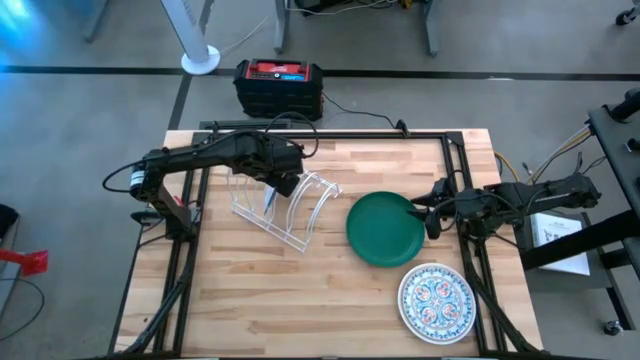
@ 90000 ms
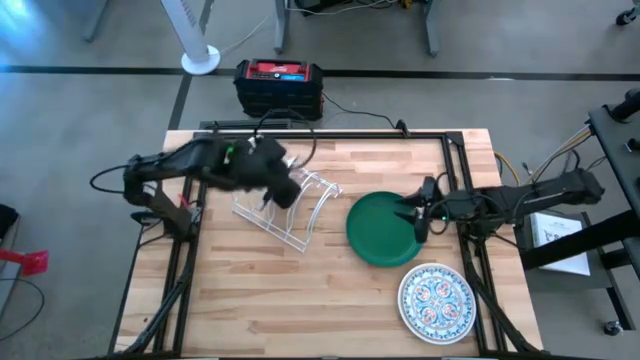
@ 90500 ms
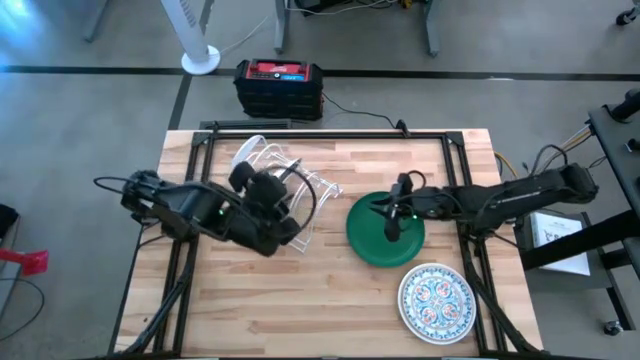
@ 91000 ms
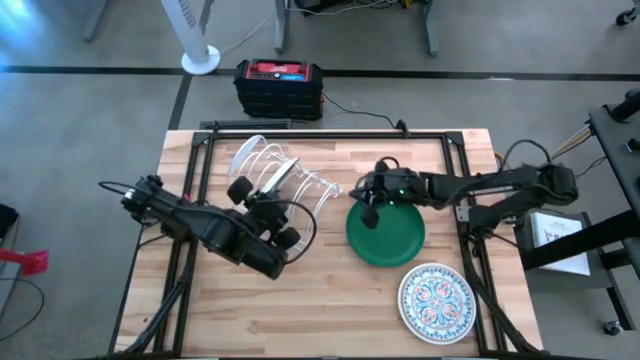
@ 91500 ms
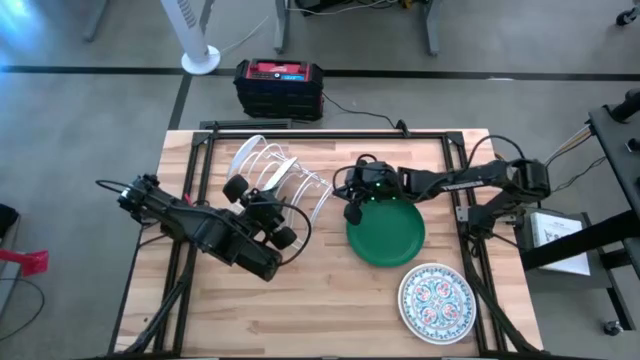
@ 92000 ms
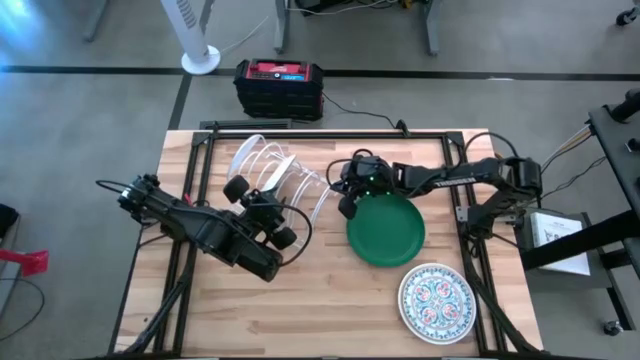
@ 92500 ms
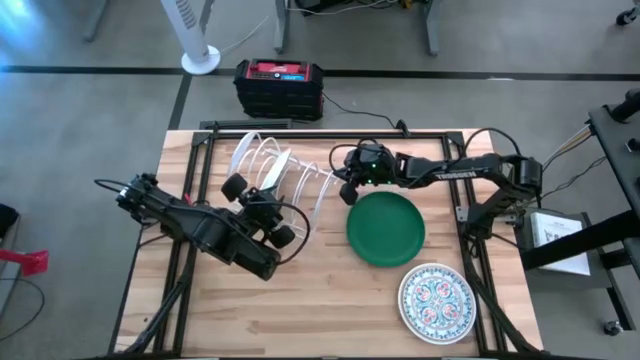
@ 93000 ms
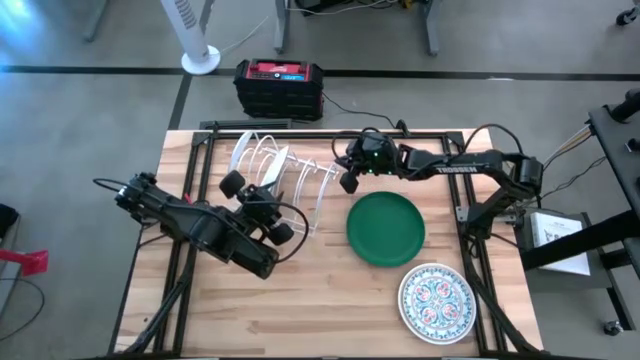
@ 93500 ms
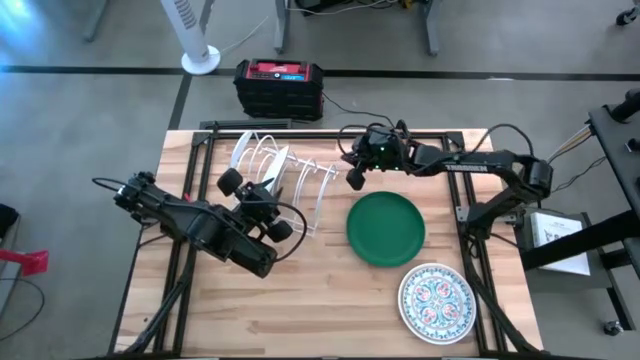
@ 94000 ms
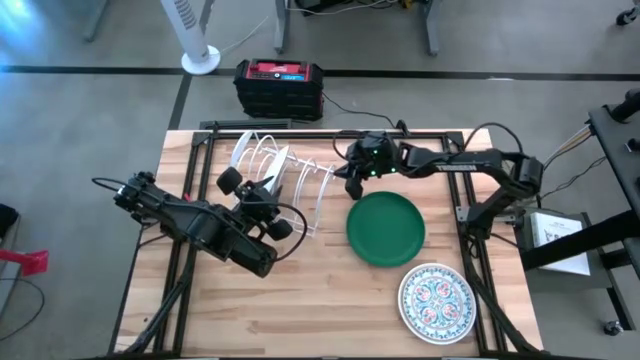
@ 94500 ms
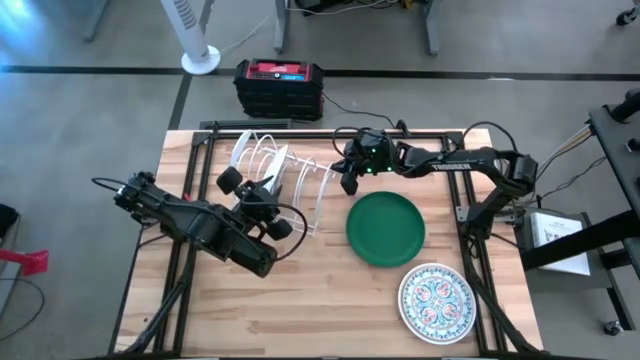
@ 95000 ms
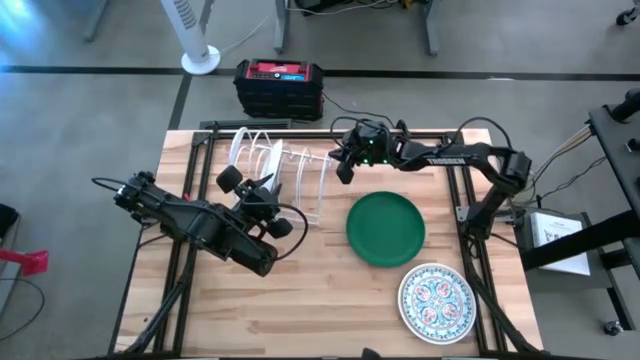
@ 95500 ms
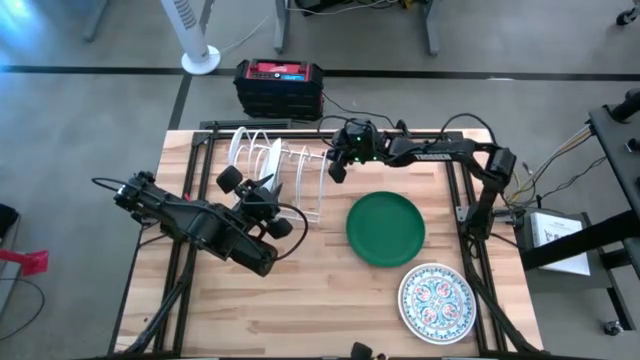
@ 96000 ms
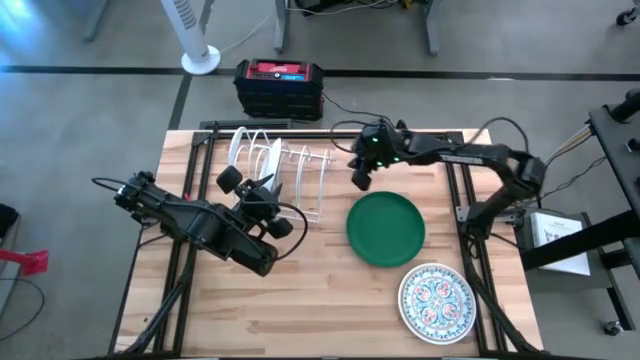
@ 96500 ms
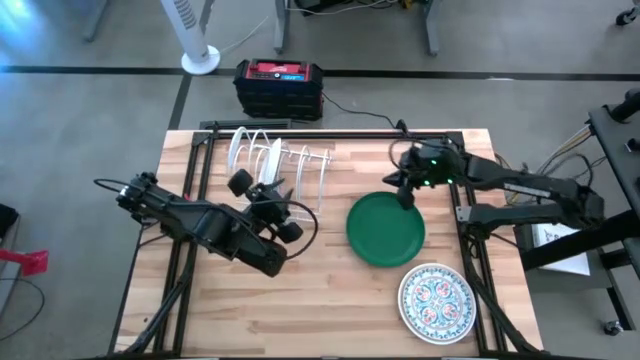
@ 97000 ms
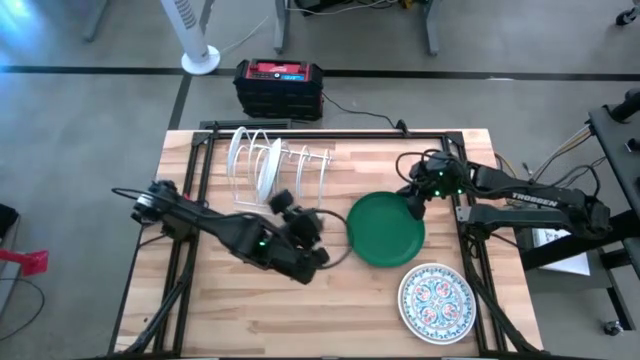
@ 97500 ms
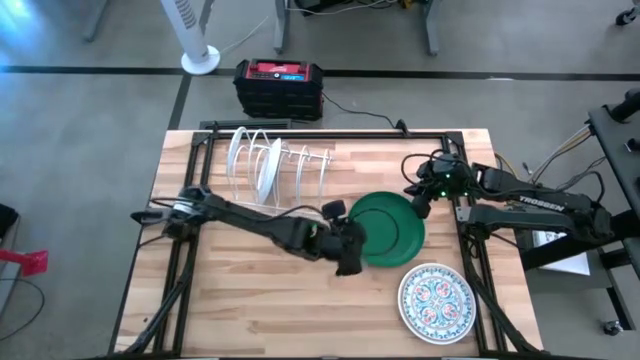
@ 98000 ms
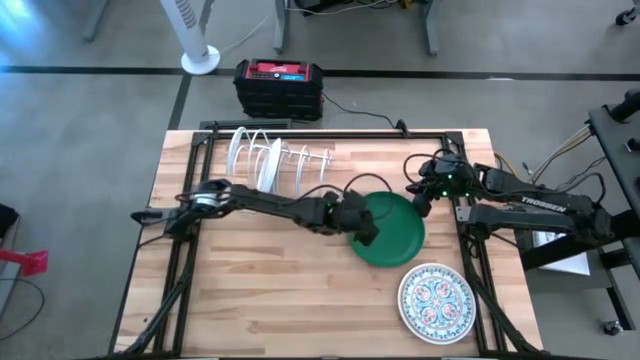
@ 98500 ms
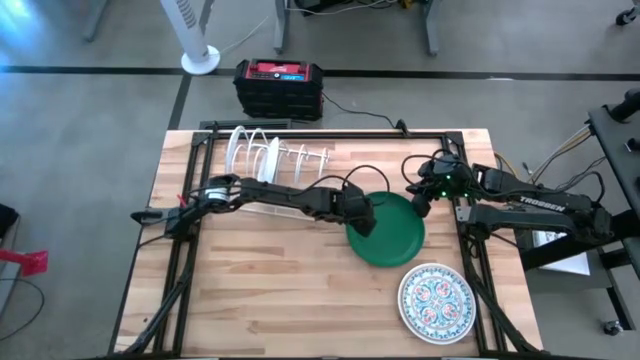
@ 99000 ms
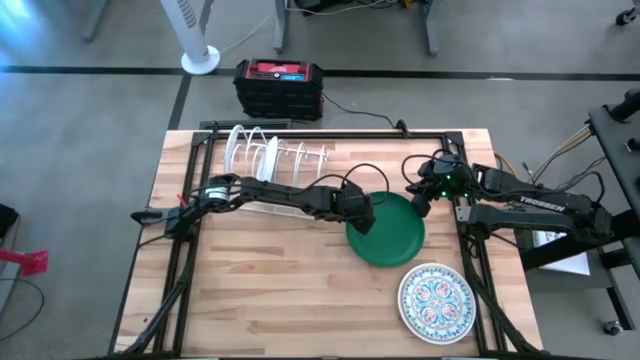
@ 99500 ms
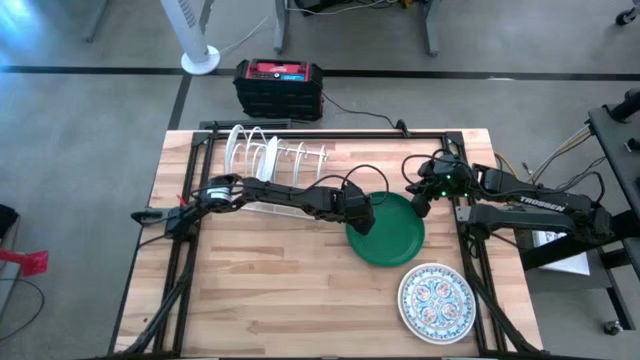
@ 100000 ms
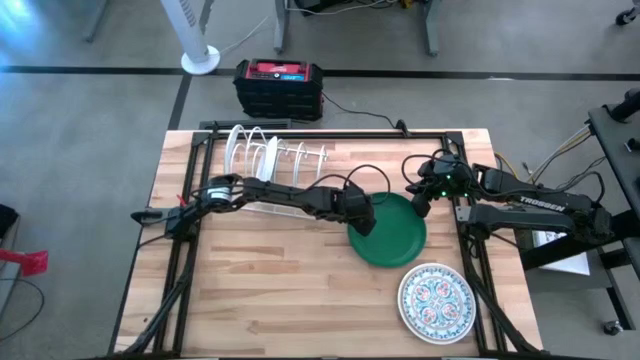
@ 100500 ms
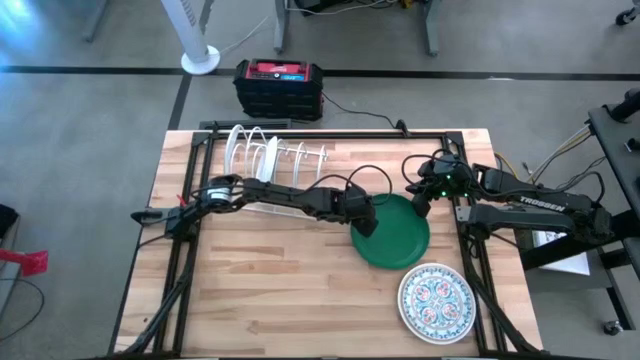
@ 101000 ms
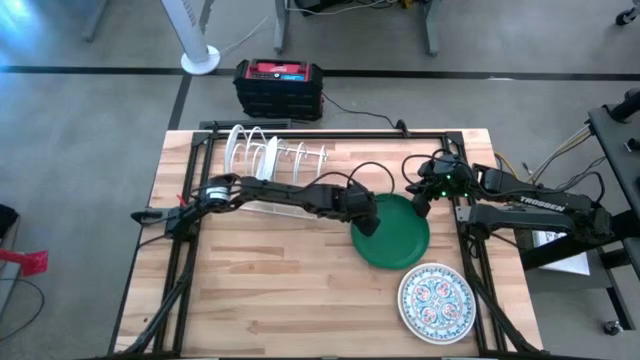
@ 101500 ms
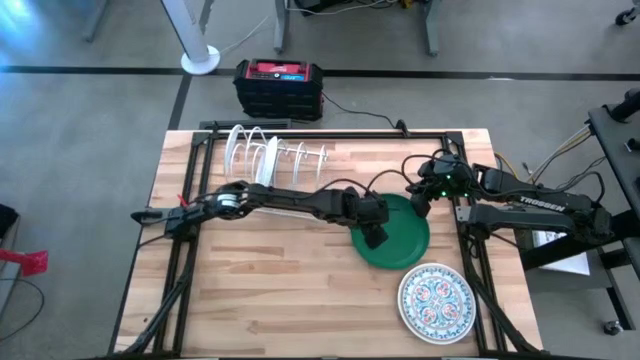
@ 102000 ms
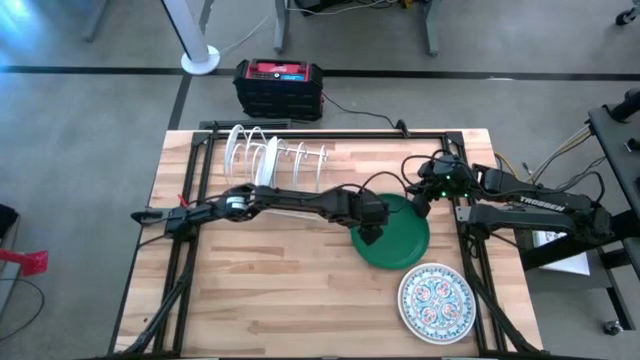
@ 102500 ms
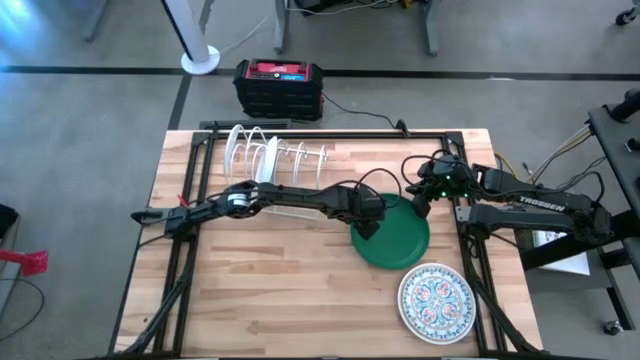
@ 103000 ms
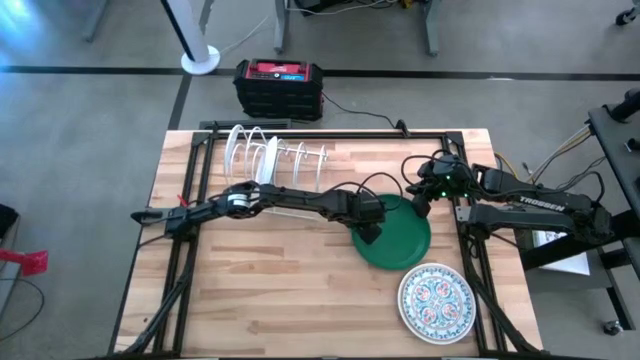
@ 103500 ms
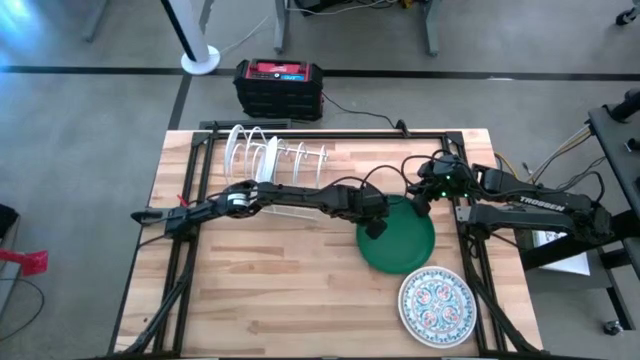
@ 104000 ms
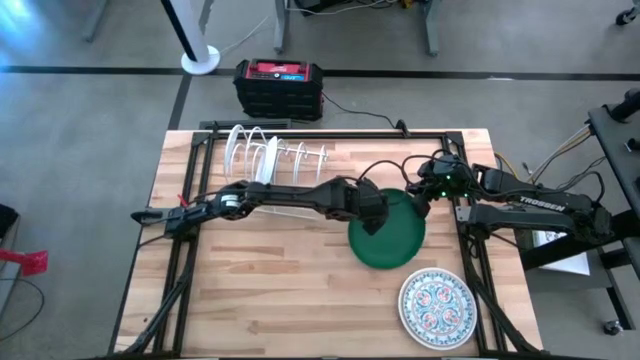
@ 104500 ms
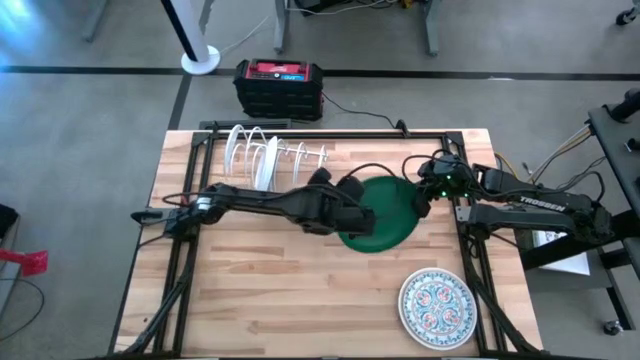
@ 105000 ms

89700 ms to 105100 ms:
Task: Sort dishes
Put the green plate in the dish rack

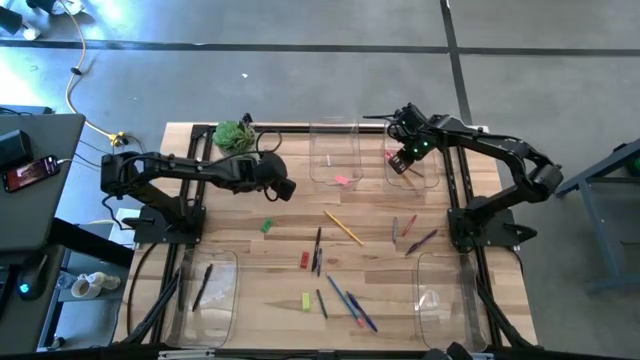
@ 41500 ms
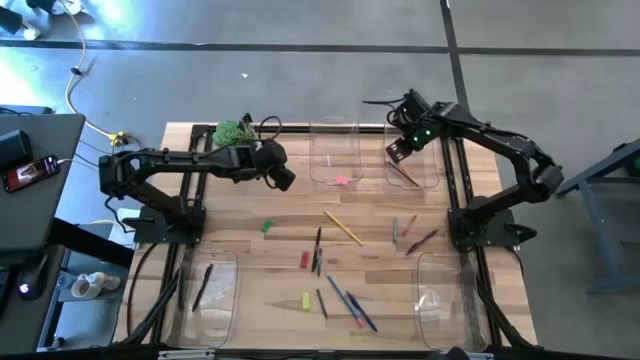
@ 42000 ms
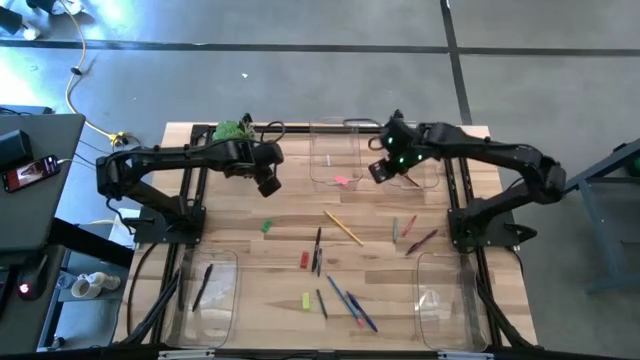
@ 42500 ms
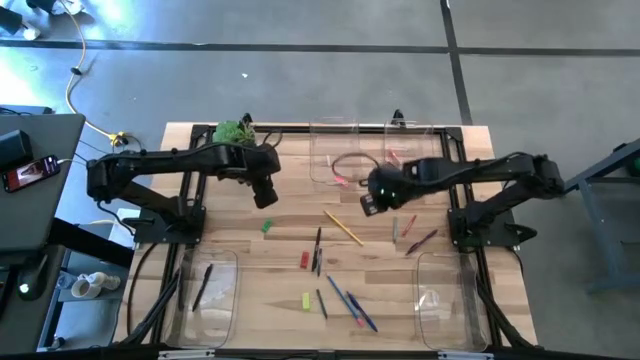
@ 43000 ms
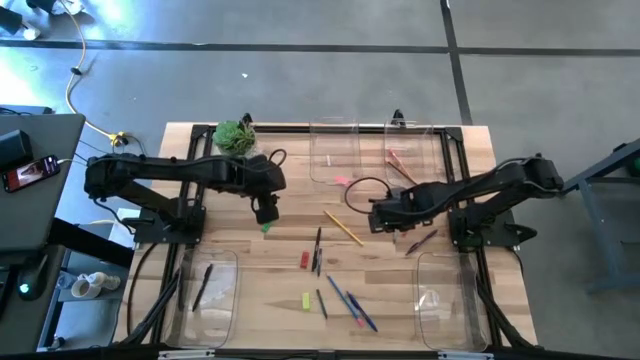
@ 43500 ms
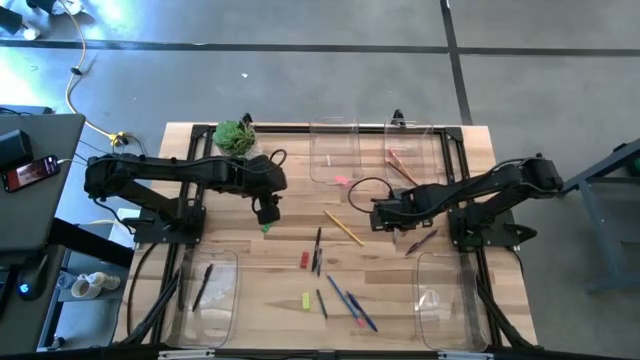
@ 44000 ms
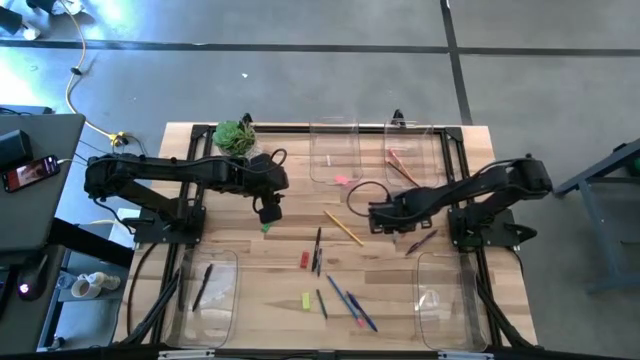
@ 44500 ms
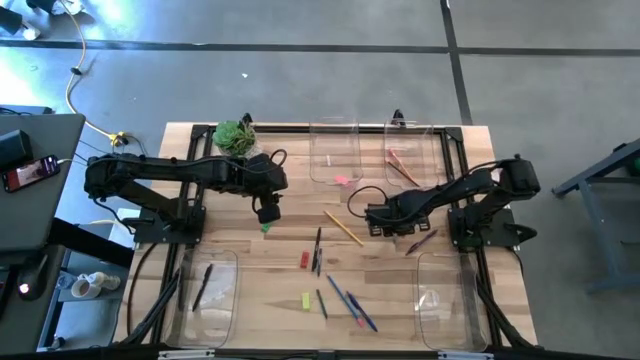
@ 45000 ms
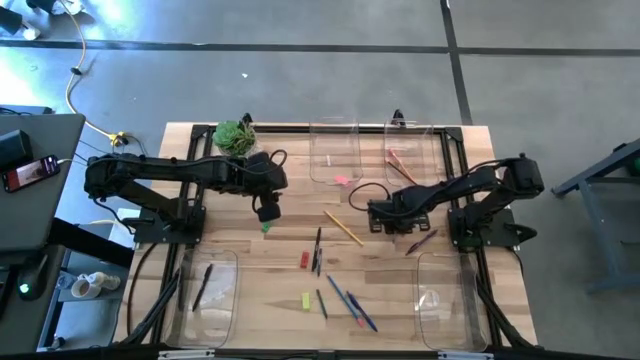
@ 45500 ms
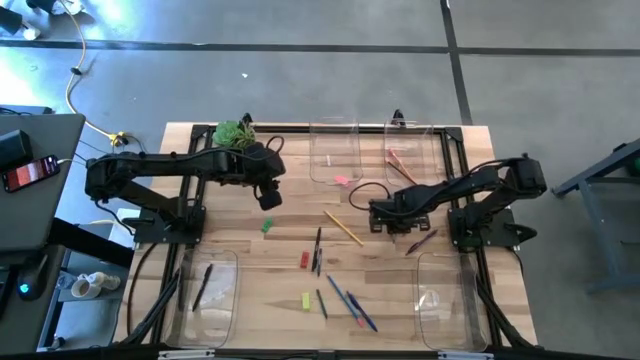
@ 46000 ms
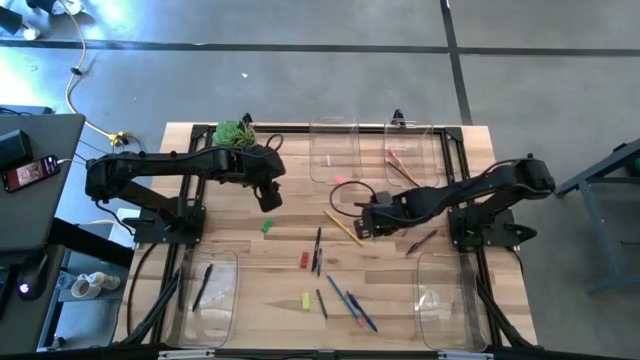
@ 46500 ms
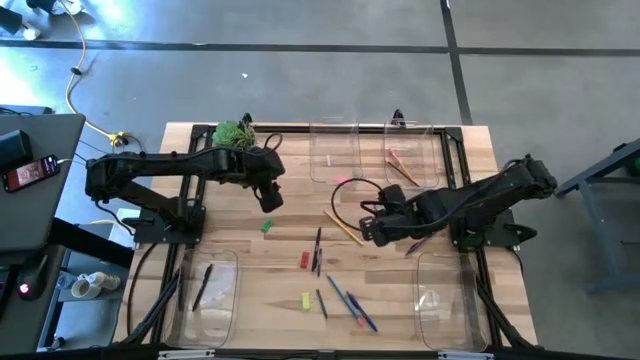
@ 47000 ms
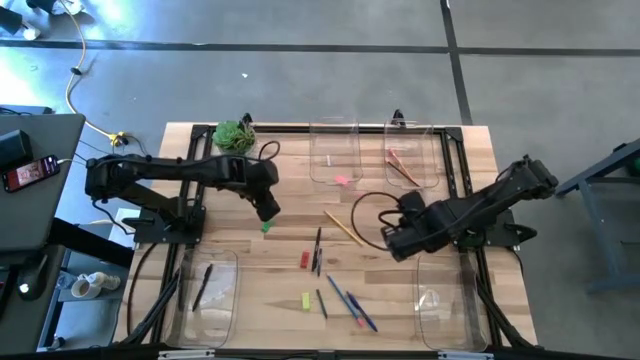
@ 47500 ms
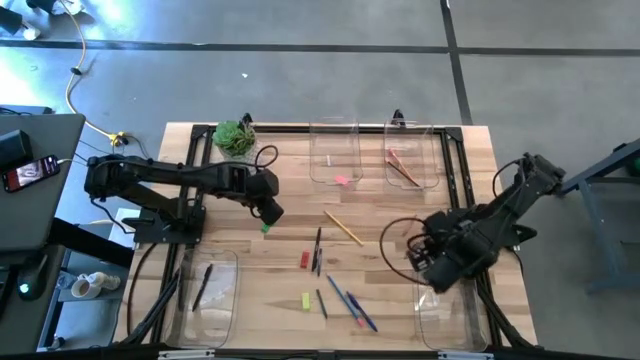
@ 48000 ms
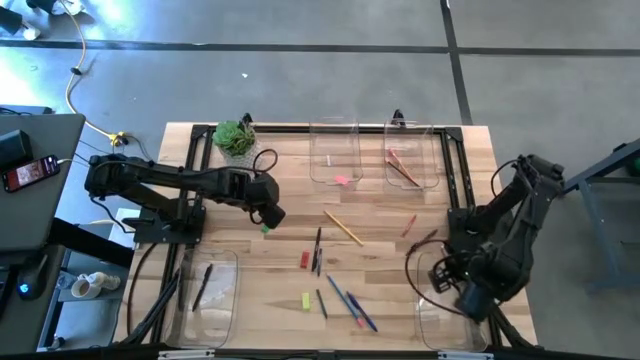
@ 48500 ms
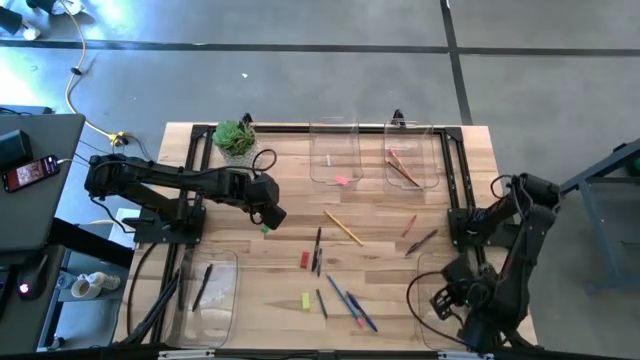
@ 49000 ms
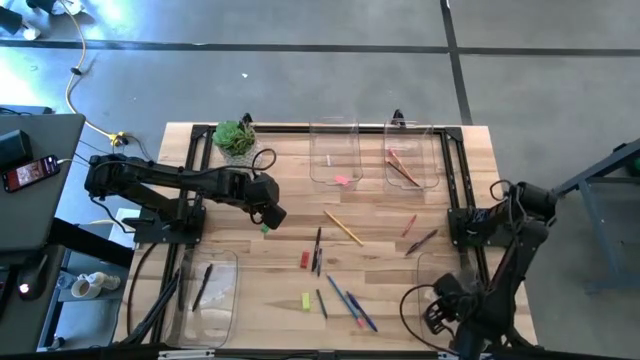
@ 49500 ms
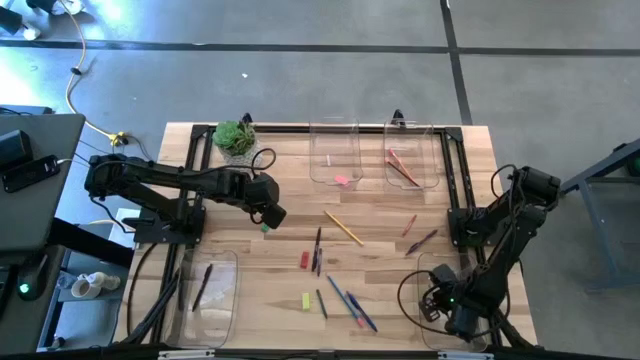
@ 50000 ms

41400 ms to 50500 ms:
Task: Sort crayons/erasers/pens/pencils in bins
Put the gray crayon into the bottom right transparent bin
